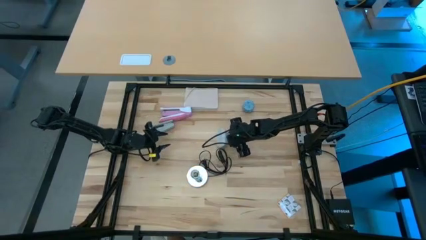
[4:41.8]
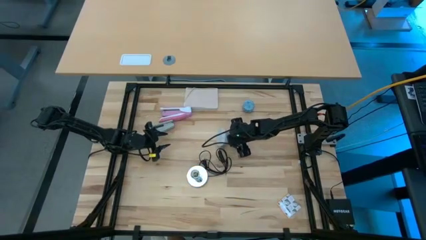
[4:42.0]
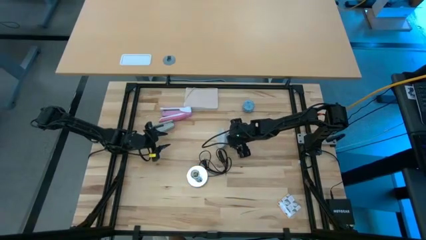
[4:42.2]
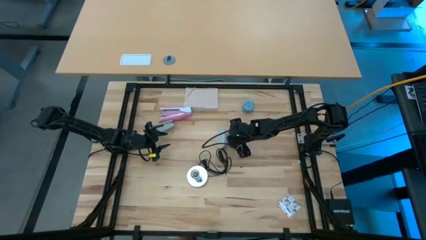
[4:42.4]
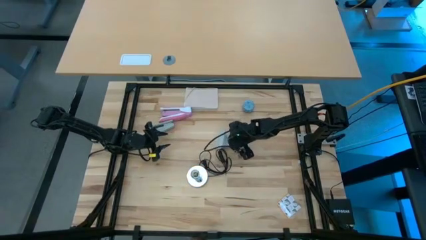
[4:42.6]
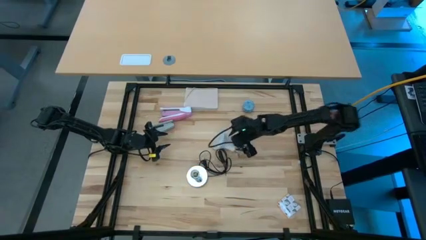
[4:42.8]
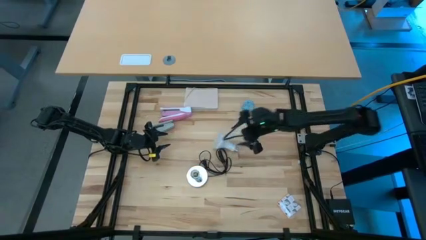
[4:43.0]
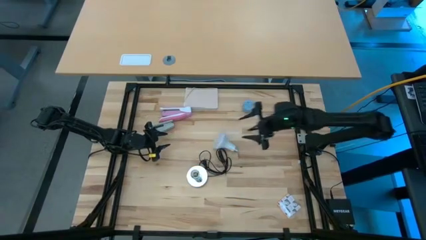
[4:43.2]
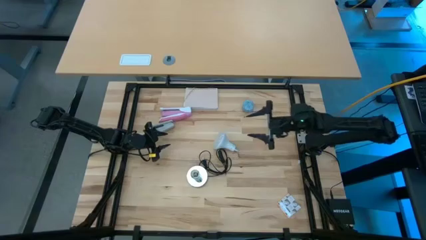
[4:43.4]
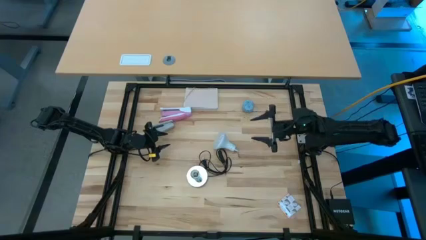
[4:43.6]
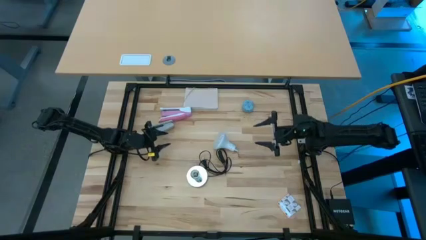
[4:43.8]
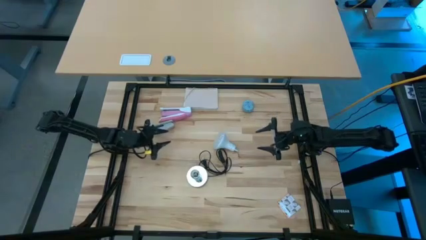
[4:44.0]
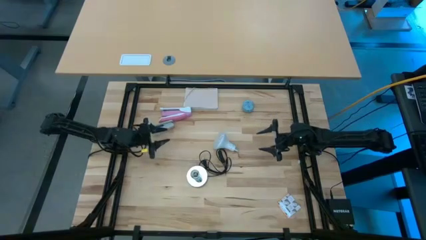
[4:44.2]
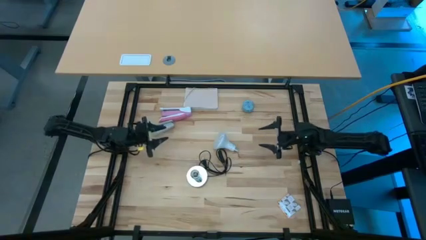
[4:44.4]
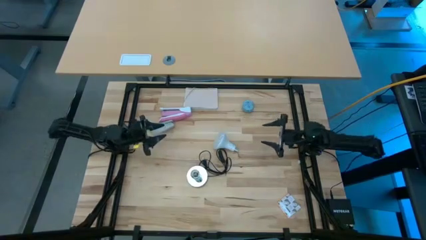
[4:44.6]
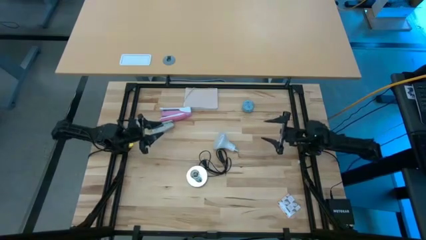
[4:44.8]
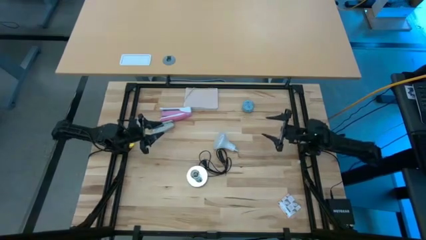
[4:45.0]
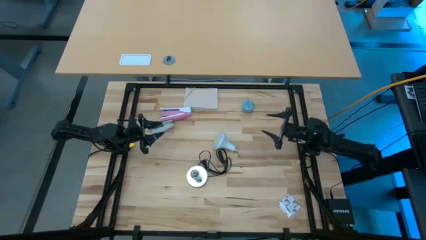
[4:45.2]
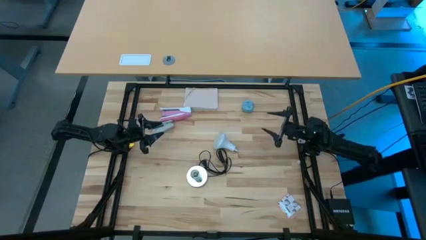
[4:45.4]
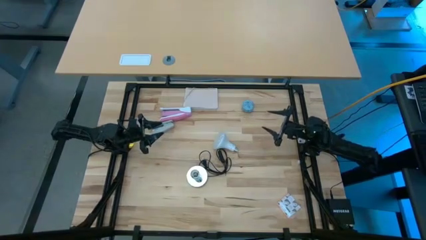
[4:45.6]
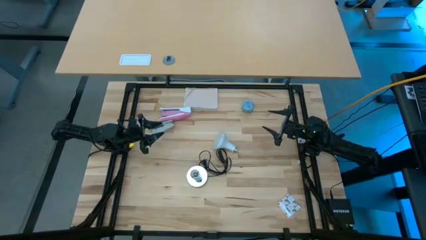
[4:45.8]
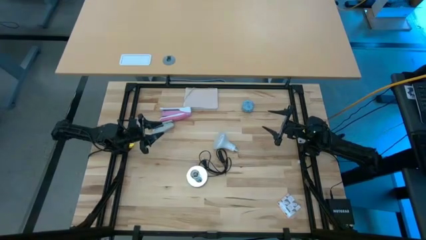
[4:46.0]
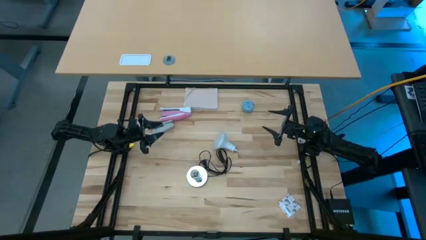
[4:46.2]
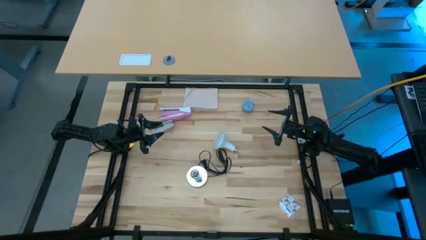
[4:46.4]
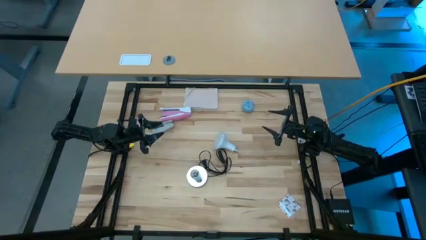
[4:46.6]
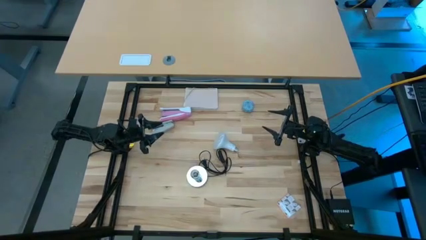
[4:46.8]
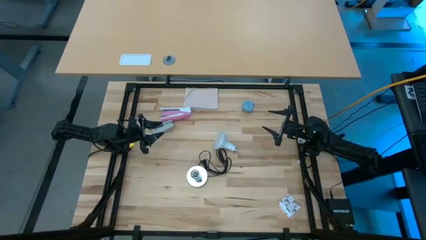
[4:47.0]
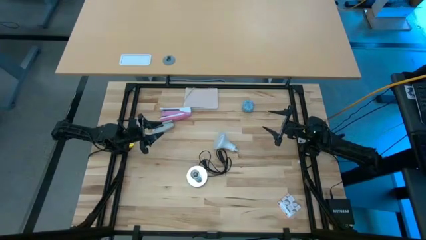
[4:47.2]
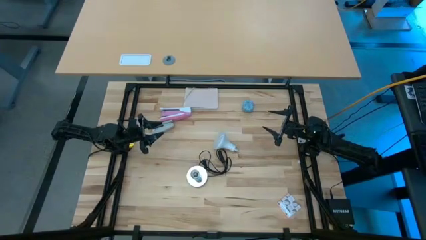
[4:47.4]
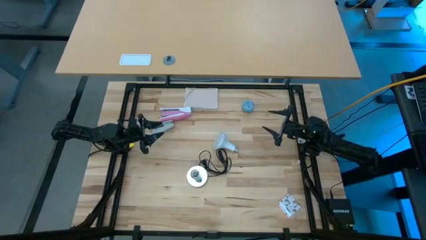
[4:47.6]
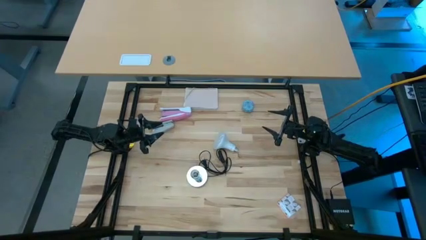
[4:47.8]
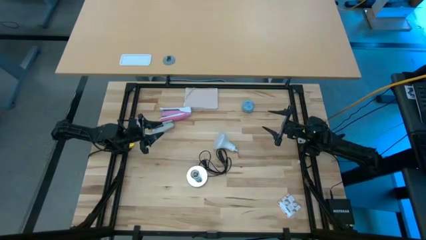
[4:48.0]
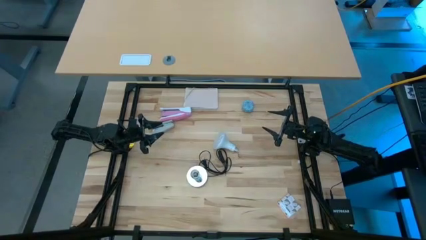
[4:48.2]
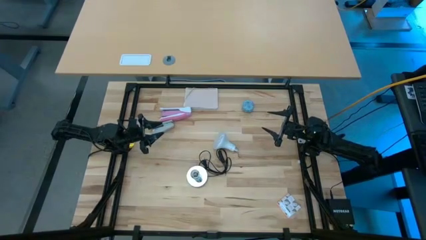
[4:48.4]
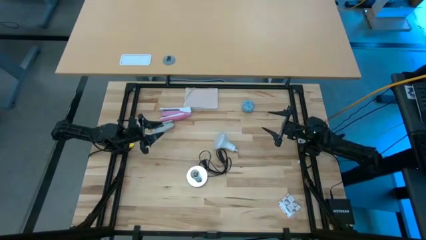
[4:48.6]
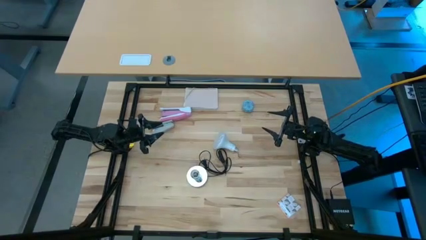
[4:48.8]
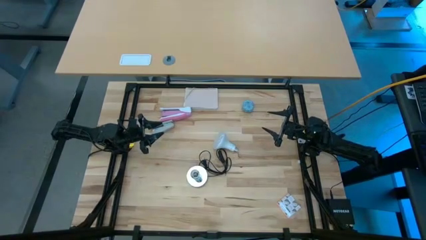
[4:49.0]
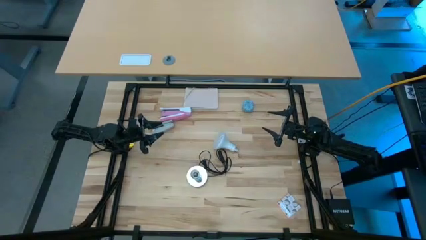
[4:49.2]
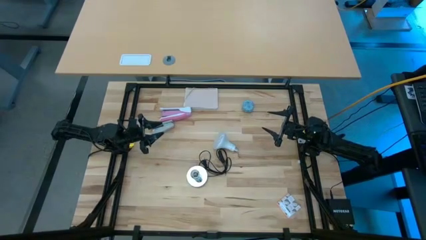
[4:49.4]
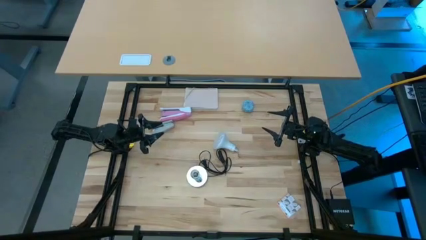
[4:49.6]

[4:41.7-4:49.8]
Task: Screw lightbulb
Return to Home Position

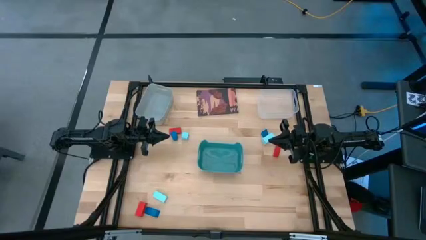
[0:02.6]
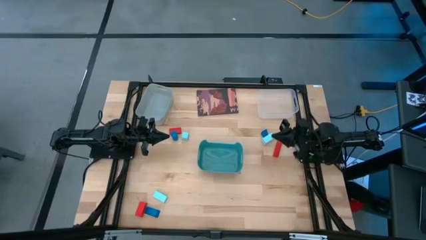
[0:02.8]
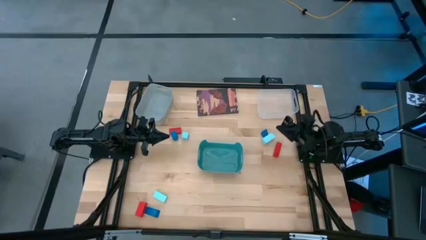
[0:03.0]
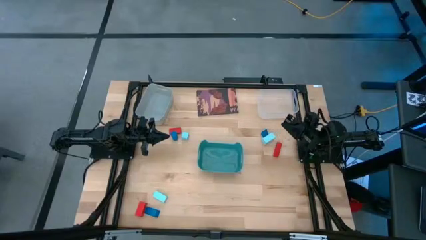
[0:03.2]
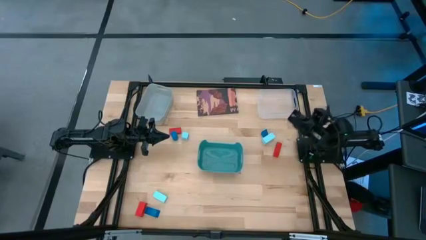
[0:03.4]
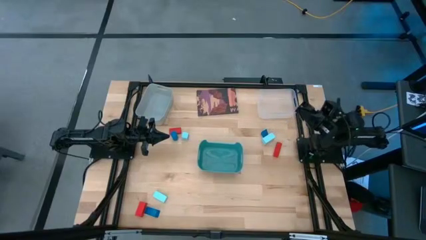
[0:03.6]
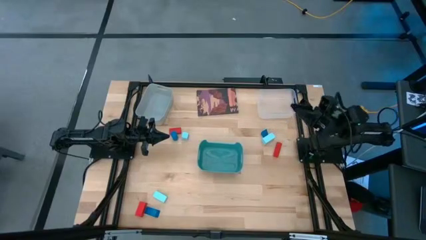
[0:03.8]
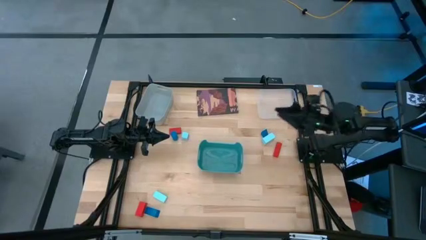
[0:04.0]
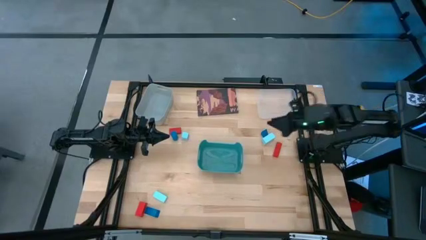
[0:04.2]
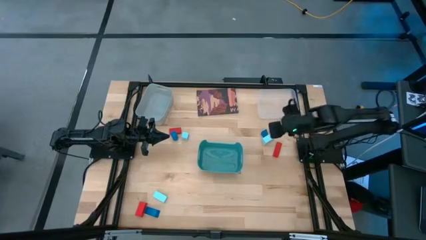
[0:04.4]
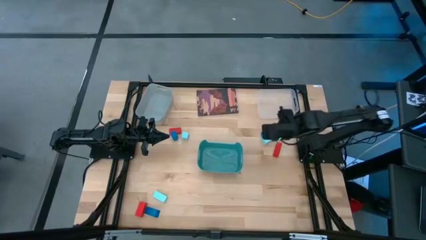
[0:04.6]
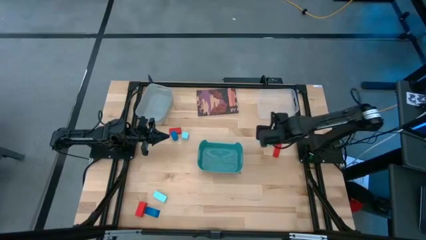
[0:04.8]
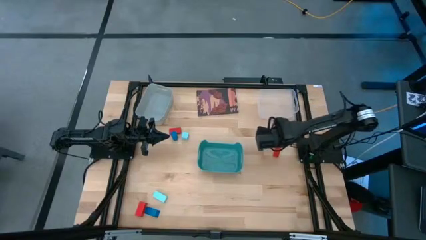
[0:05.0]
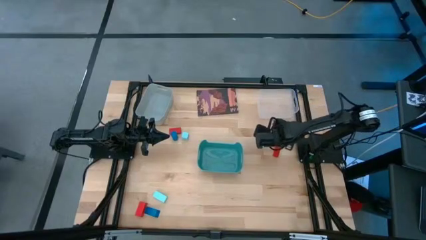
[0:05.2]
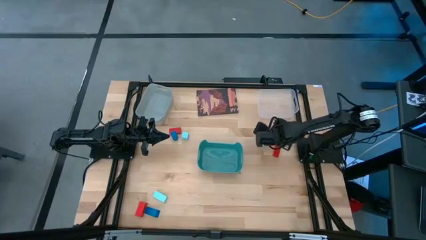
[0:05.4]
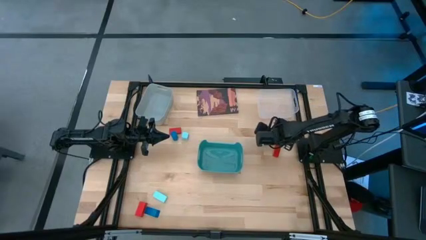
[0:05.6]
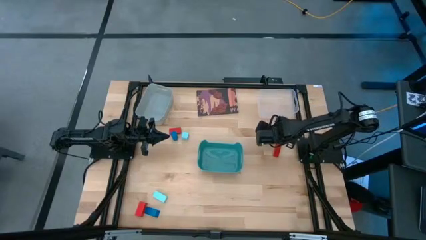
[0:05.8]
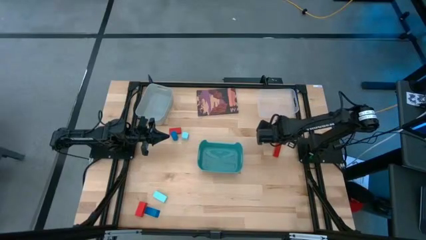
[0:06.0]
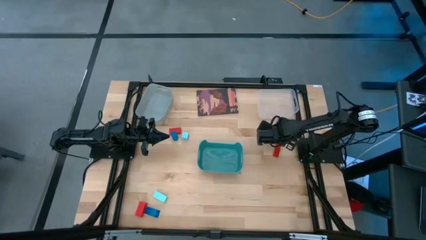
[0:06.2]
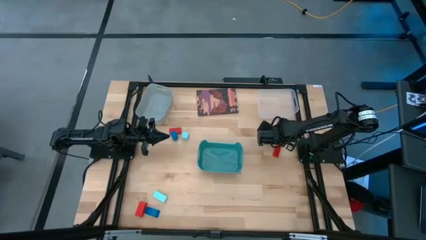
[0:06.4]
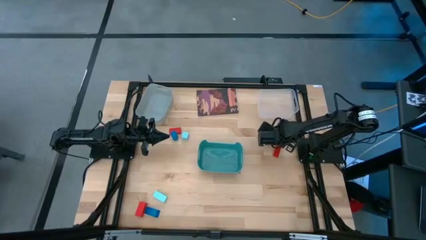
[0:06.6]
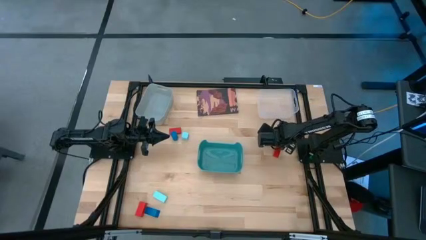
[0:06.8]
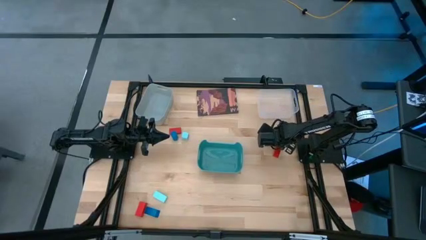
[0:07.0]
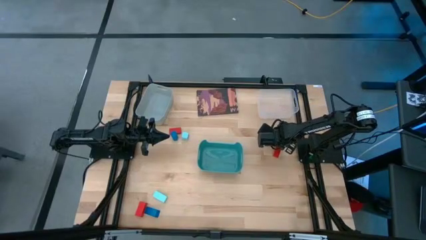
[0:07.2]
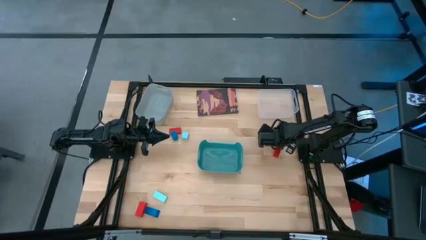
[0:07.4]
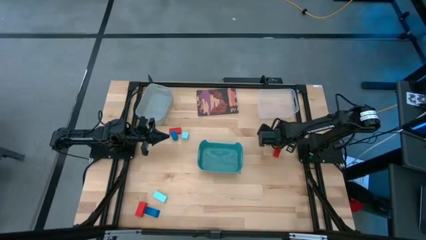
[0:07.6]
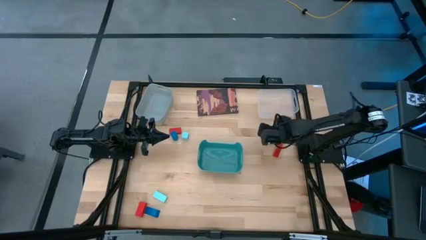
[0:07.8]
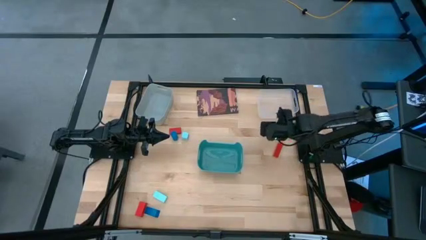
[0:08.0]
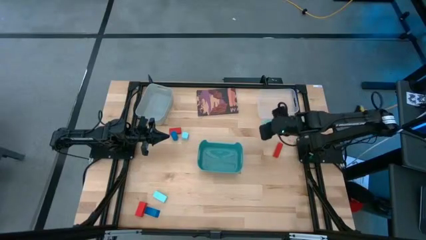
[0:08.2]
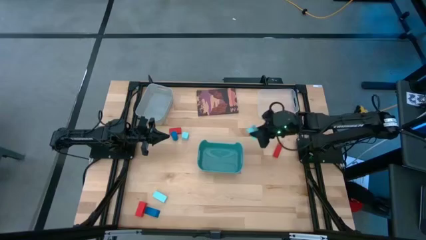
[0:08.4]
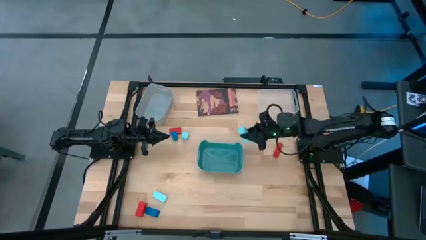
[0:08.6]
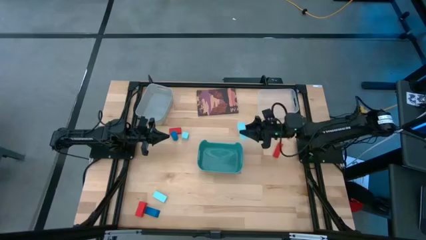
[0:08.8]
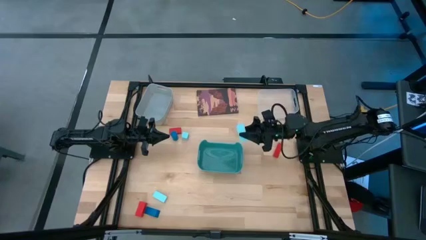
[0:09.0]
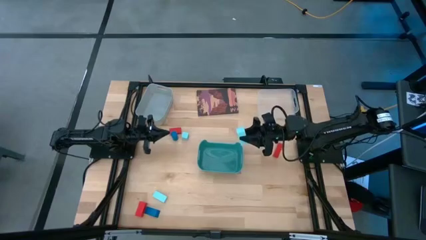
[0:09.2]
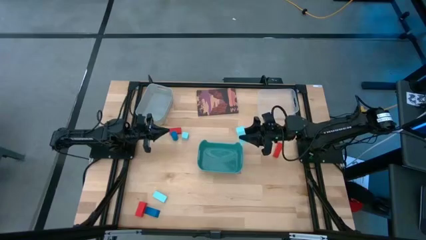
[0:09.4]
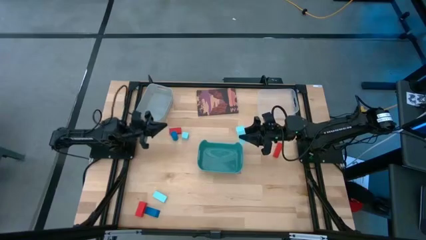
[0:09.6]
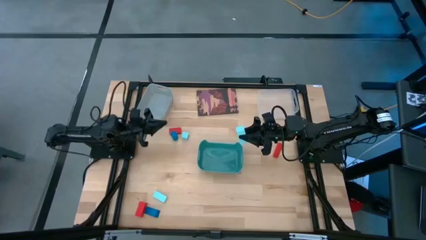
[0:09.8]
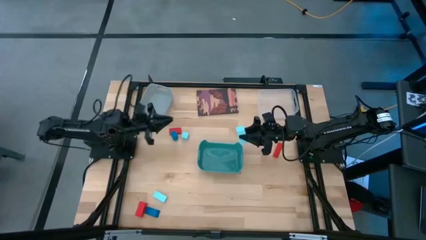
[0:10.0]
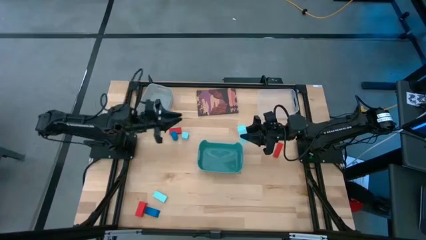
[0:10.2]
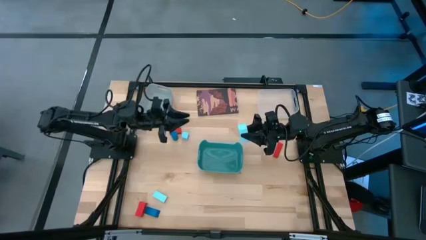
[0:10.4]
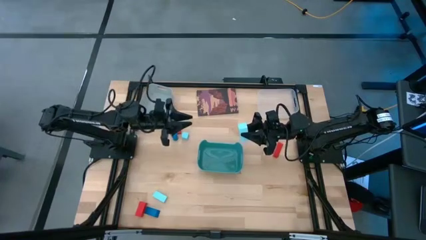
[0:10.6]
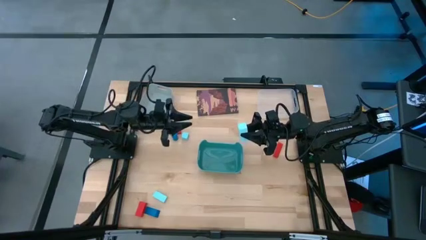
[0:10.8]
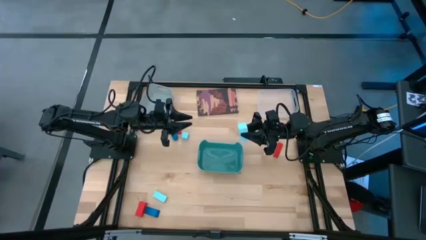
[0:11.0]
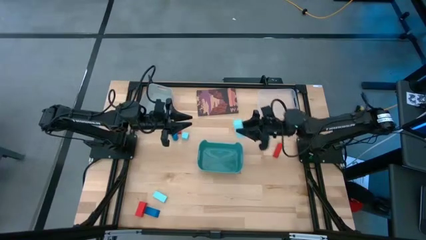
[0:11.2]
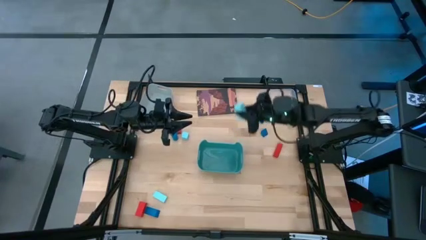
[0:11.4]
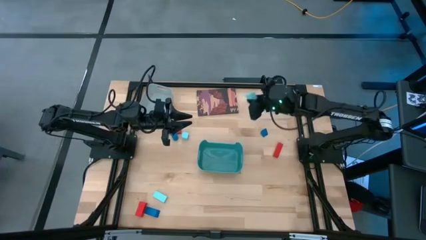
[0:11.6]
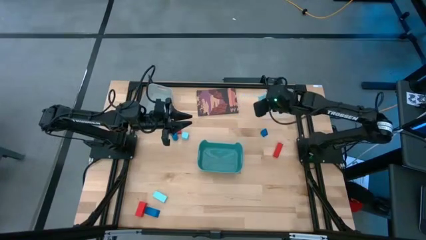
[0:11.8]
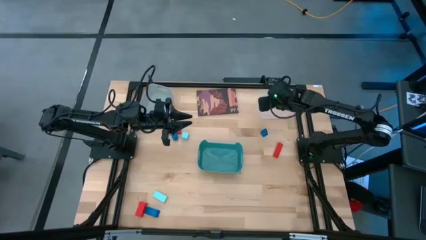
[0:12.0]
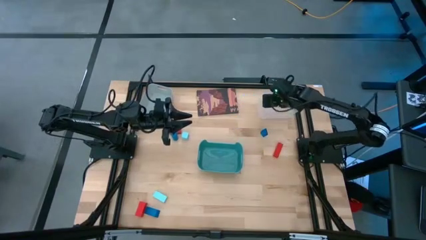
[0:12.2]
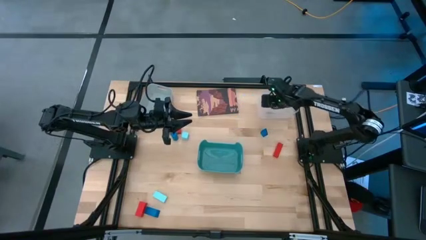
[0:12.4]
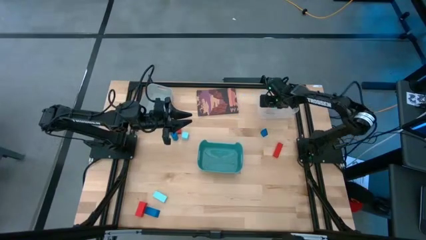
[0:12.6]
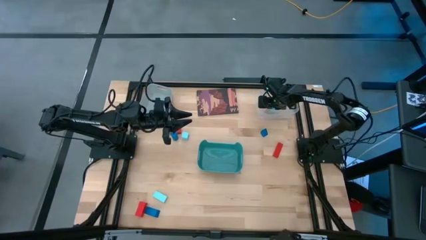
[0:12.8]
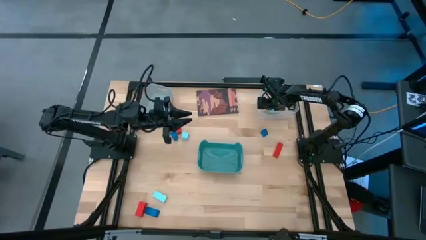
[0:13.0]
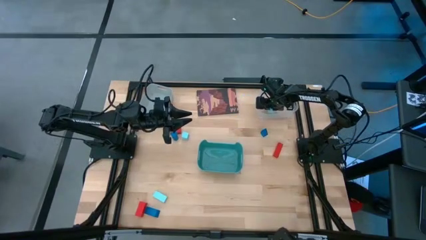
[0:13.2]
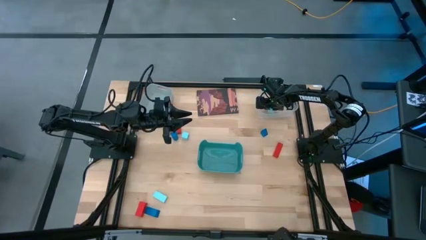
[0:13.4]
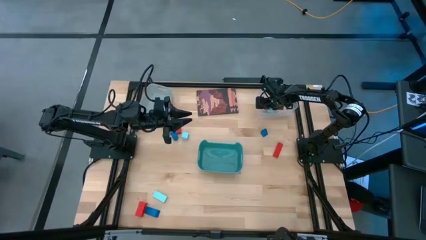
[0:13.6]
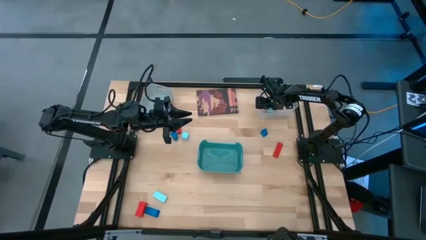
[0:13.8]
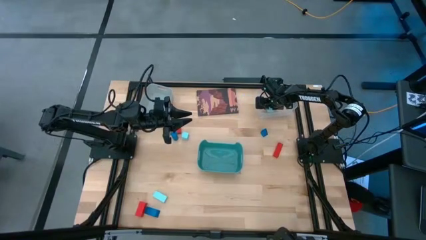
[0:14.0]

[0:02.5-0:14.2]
Task: Sort & place blocks by color
Put the top rectangular blue green block into the transparent bin
